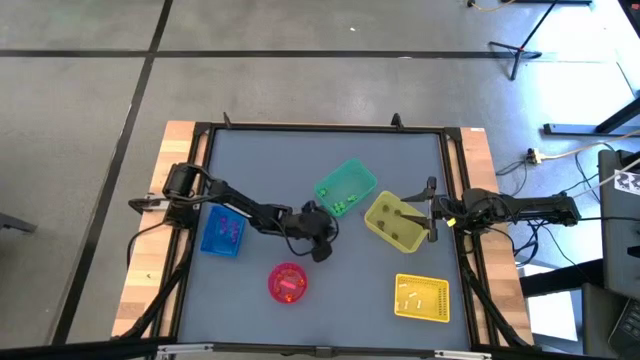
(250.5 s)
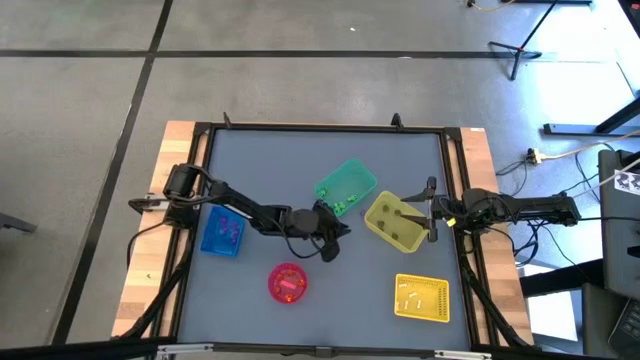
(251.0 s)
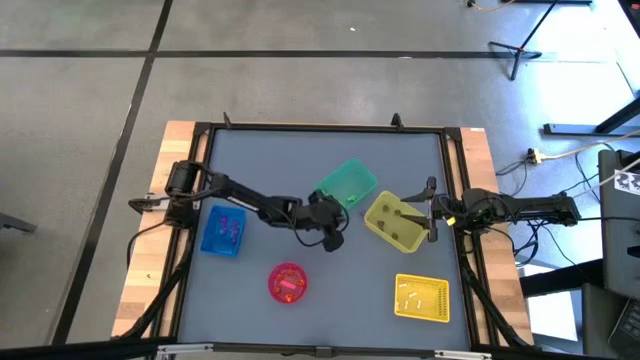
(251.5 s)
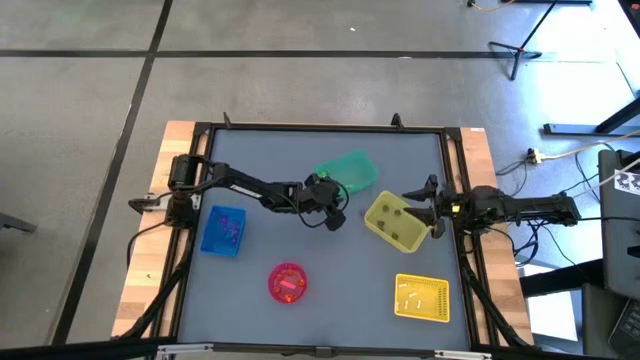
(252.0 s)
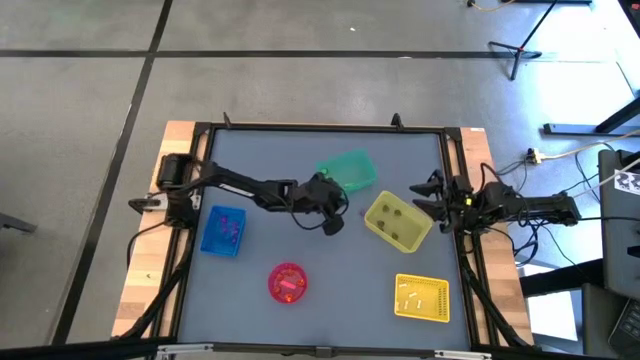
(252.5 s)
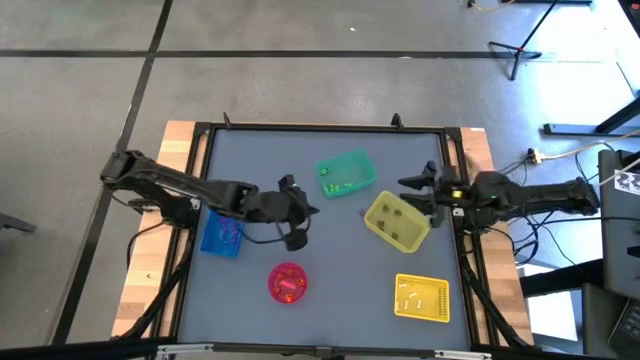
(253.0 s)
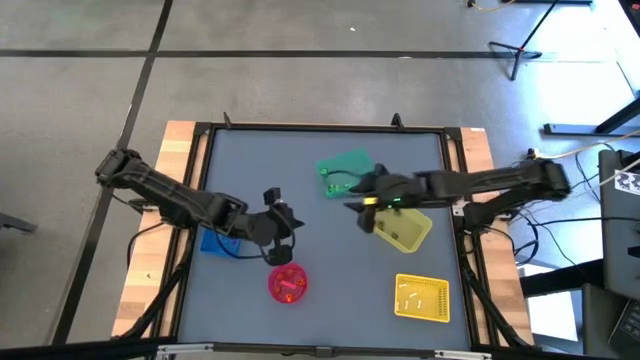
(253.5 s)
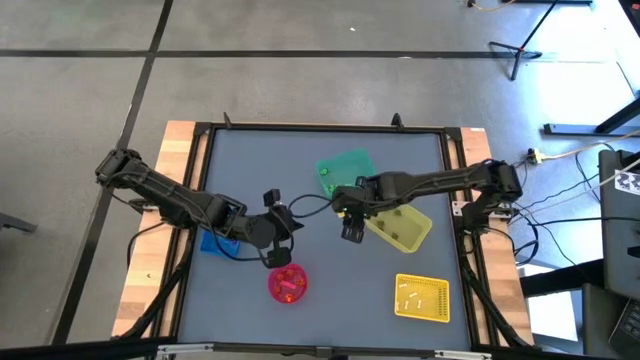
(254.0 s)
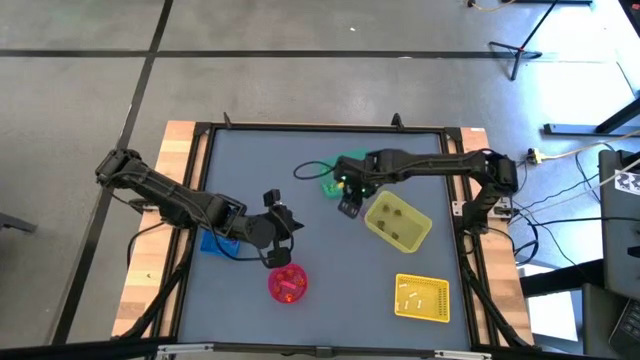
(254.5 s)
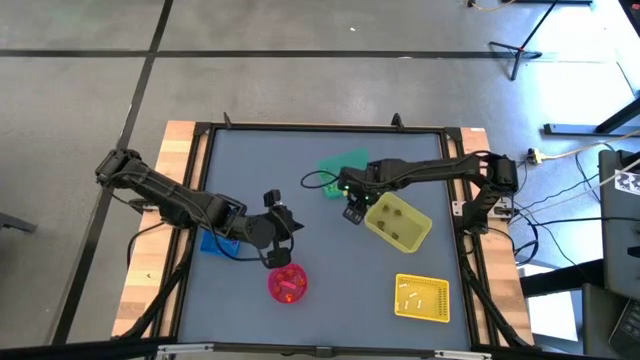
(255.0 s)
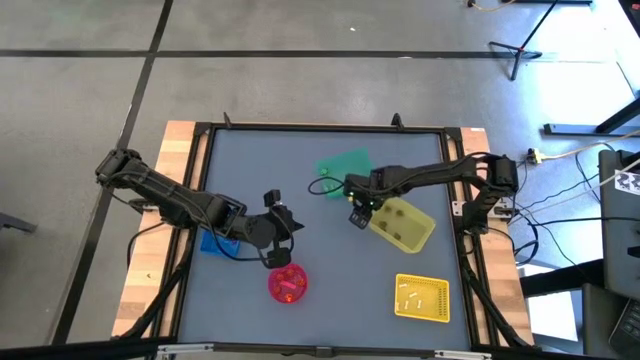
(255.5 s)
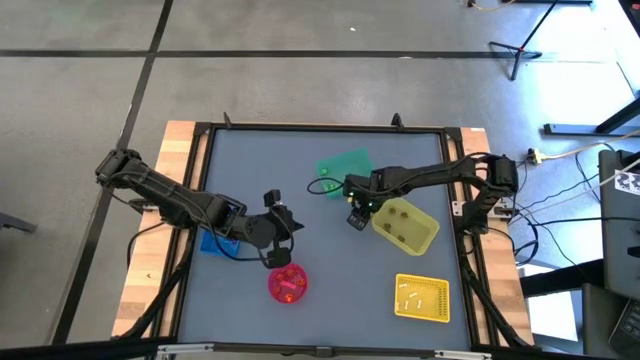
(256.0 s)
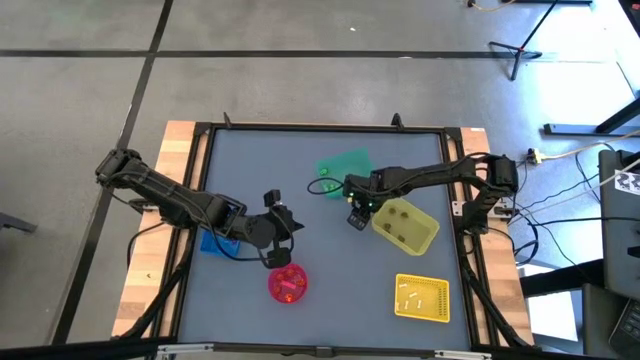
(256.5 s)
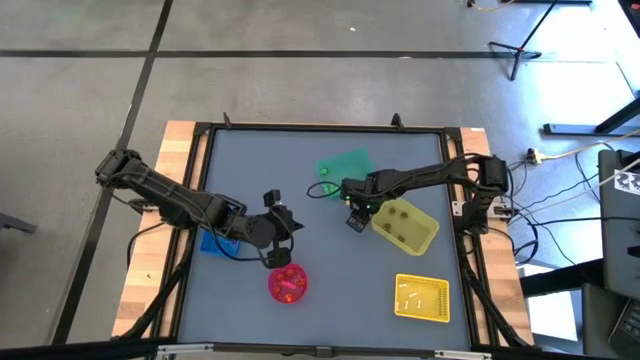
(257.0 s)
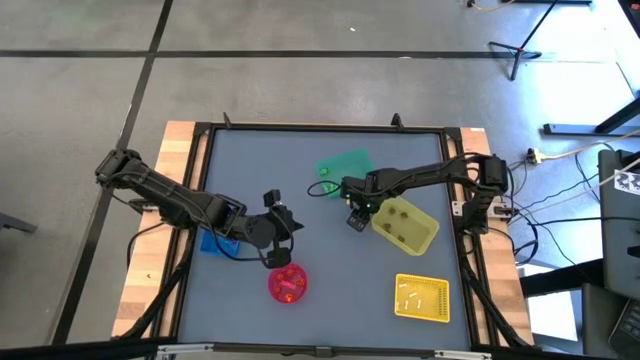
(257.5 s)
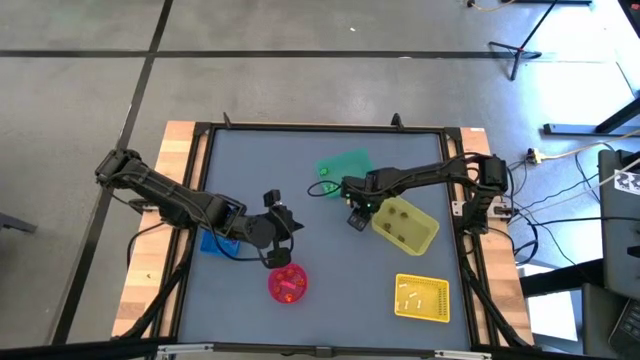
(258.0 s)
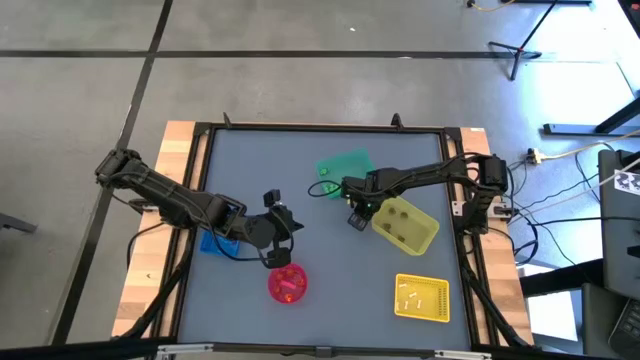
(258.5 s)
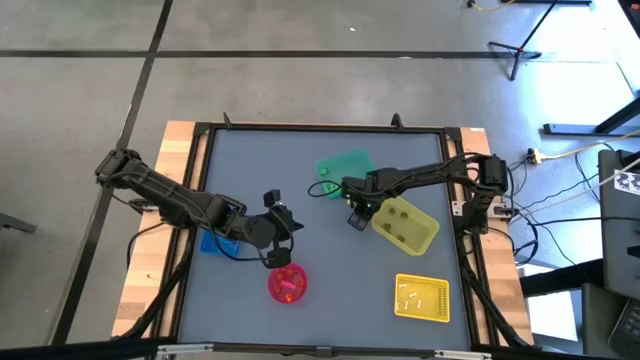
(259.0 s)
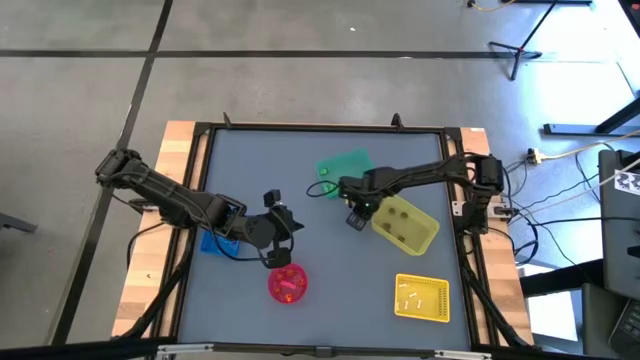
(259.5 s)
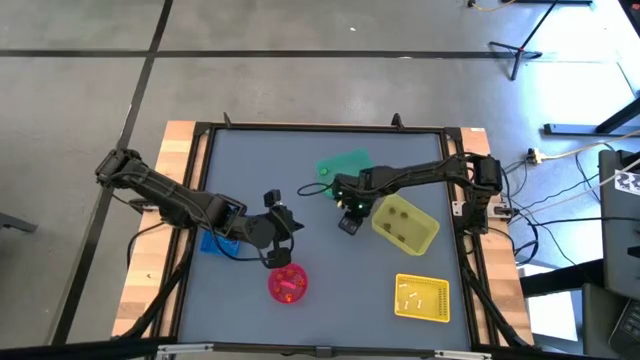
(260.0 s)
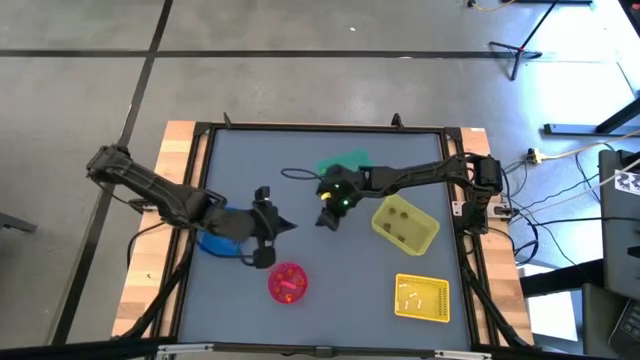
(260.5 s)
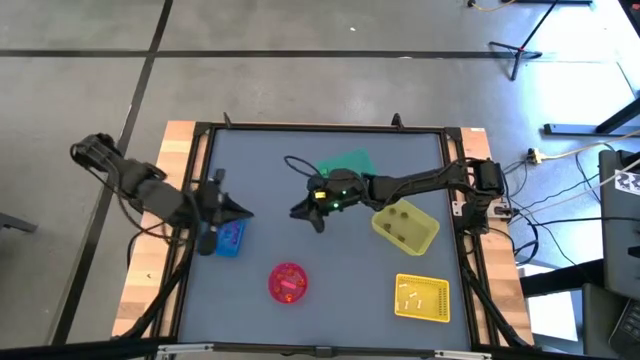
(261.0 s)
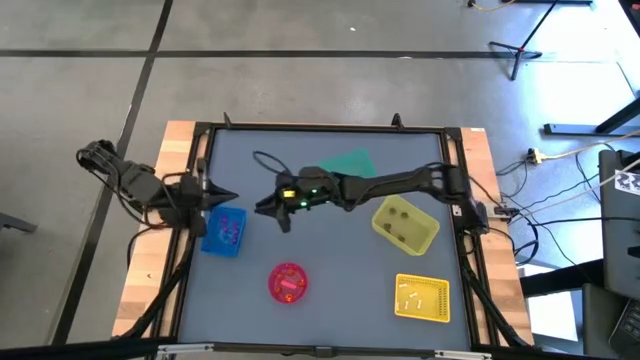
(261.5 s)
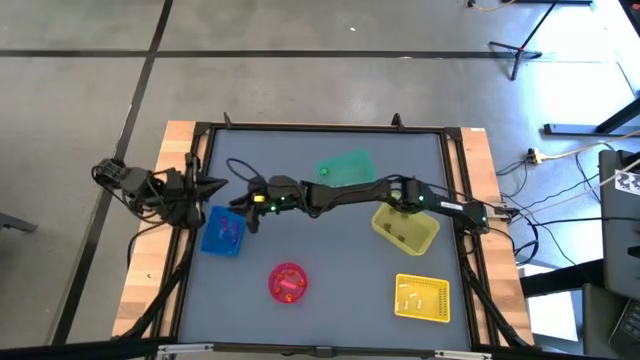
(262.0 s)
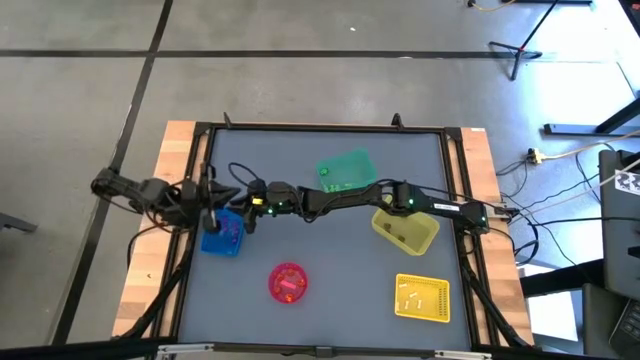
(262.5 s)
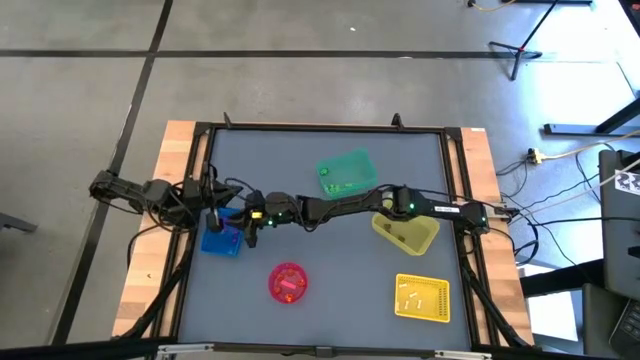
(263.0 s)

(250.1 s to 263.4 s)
Task: Sort Halloween decoration
Put the violet spider toy into the blue bin

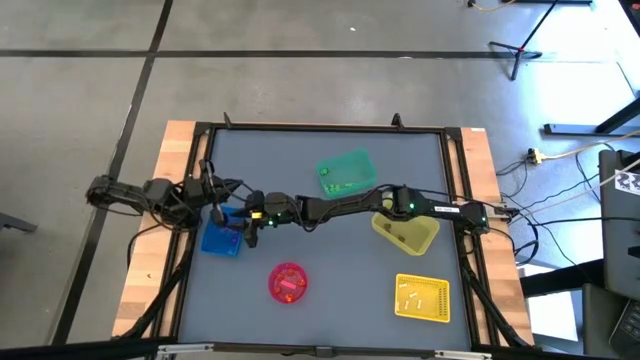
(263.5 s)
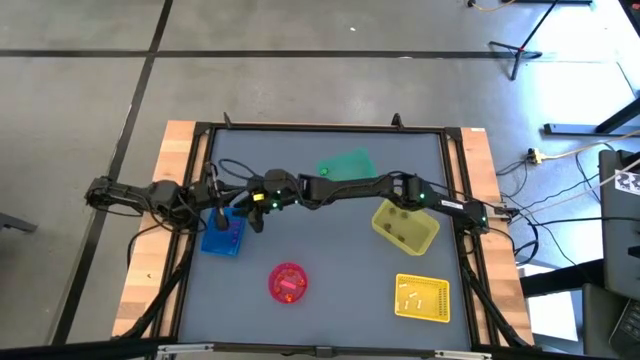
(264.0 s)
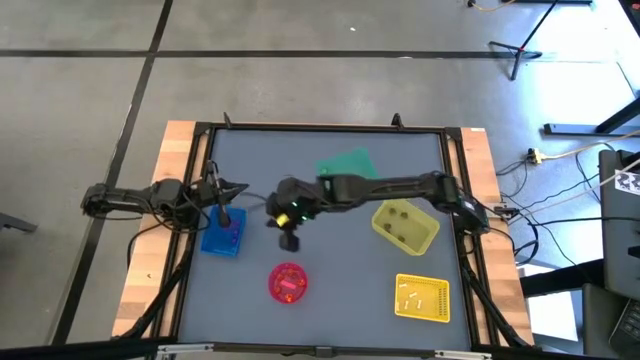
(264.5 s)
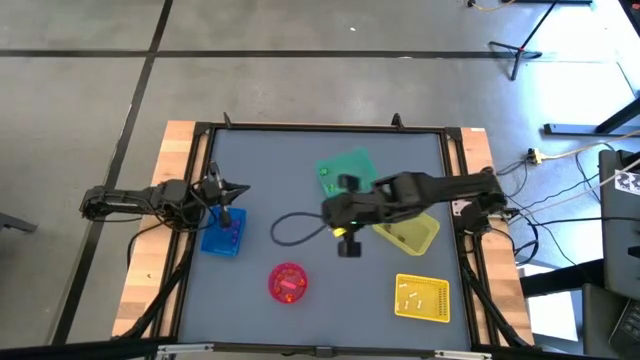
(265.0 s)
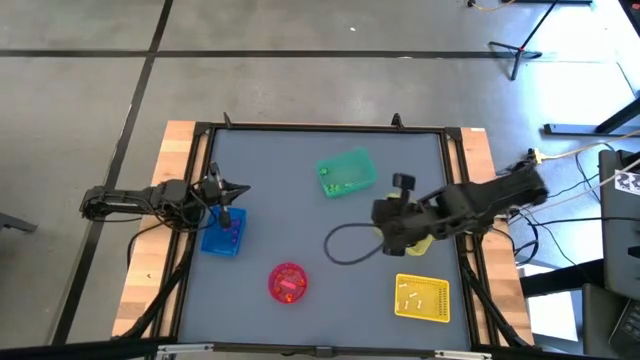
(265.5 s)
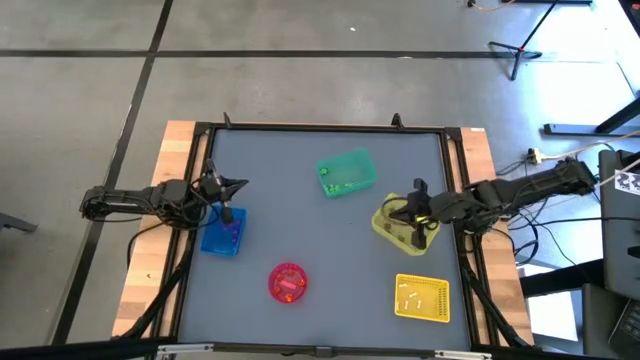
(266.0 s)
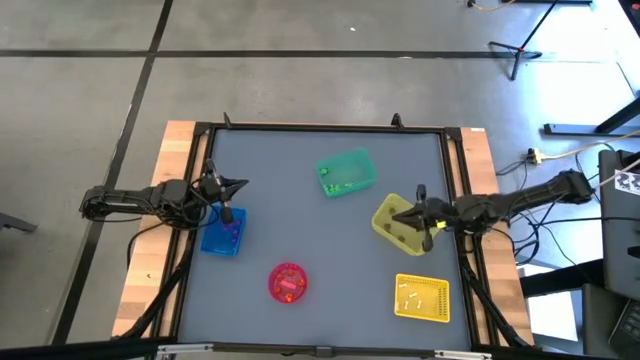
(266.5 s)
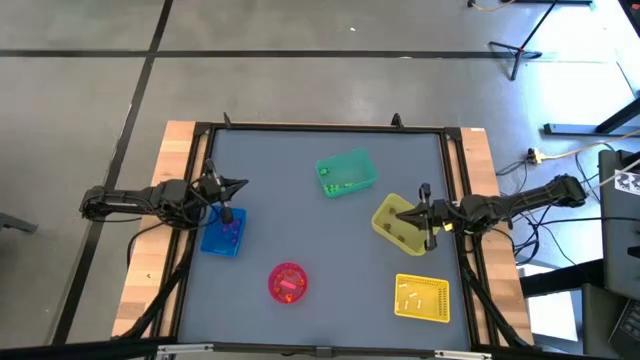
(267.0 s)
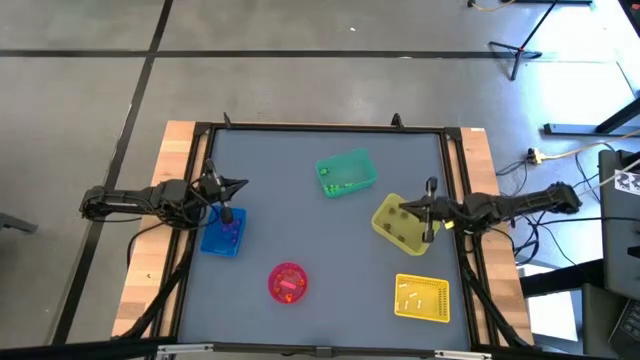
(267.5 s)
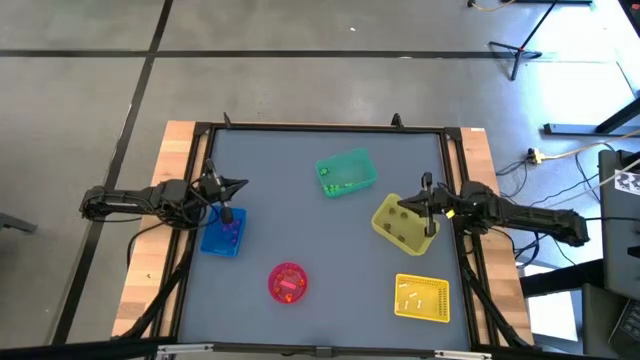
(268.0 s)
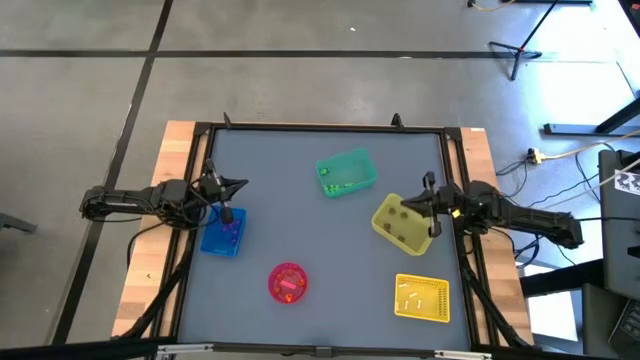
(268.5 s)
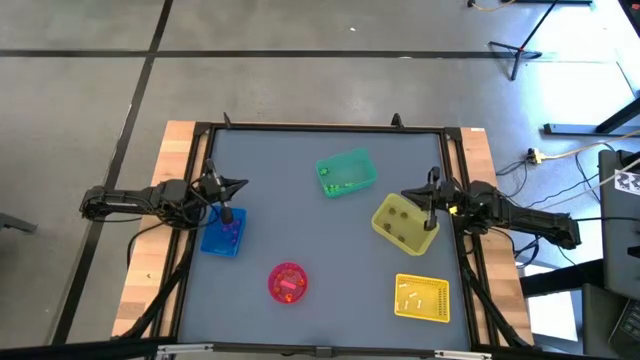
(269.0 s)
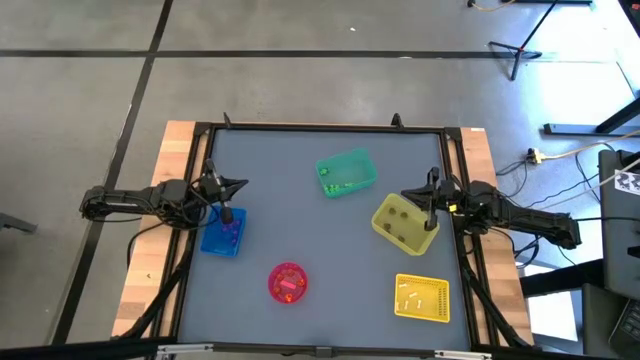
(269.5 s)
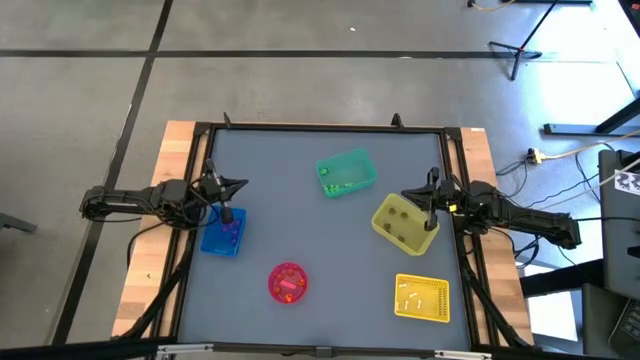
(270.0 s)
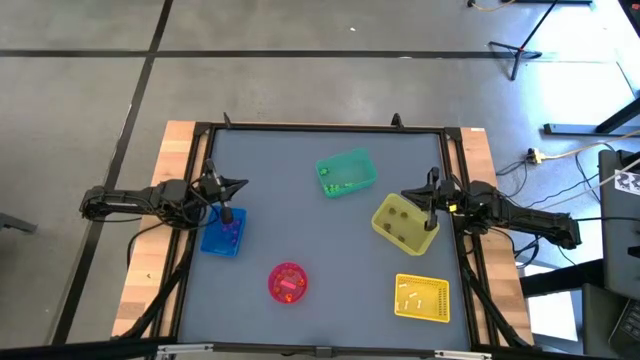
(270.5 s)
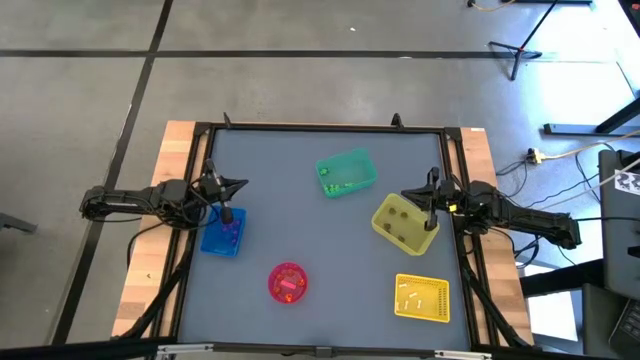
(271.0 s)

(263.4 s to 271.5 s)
Return to Home Position

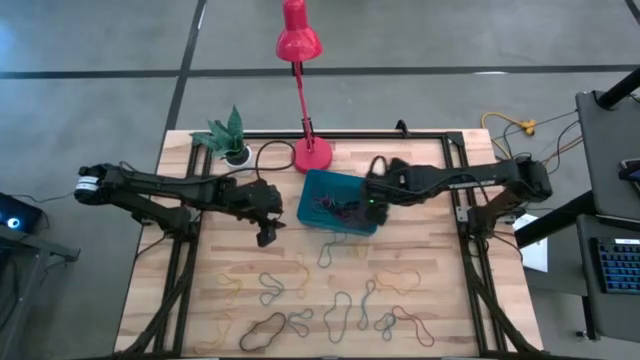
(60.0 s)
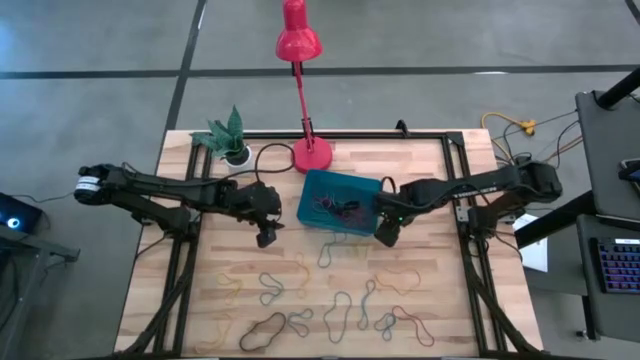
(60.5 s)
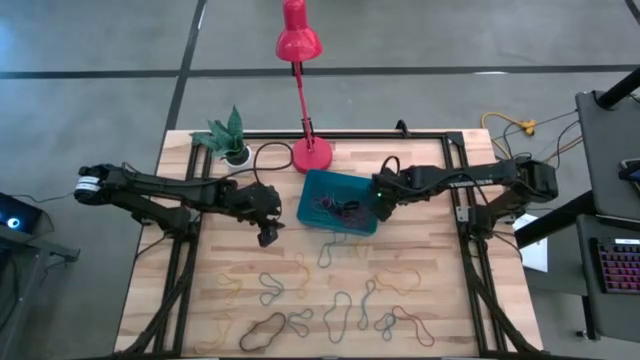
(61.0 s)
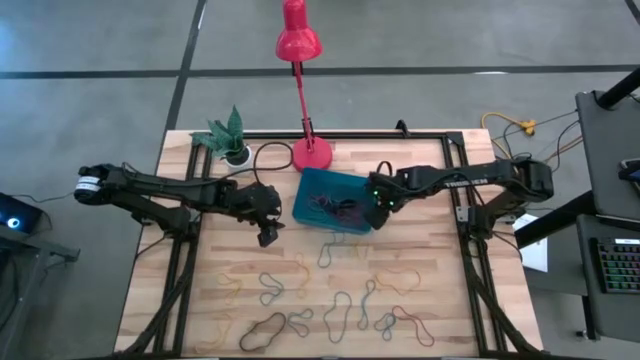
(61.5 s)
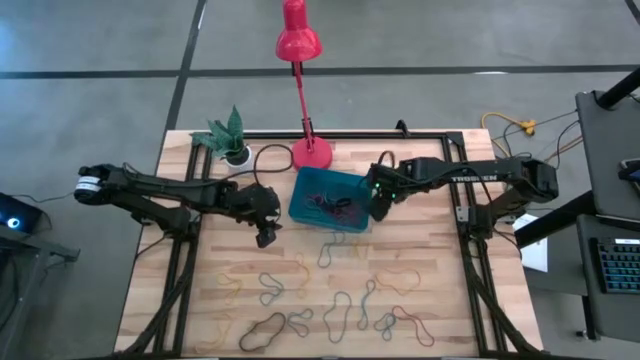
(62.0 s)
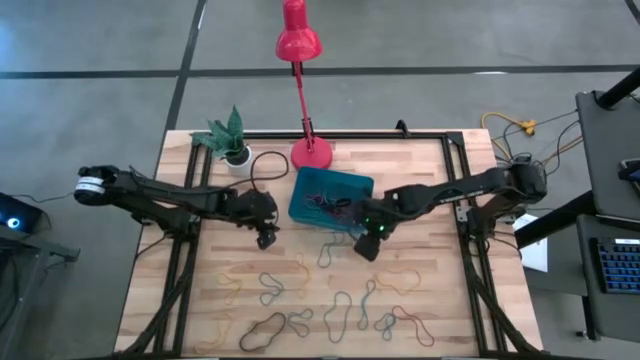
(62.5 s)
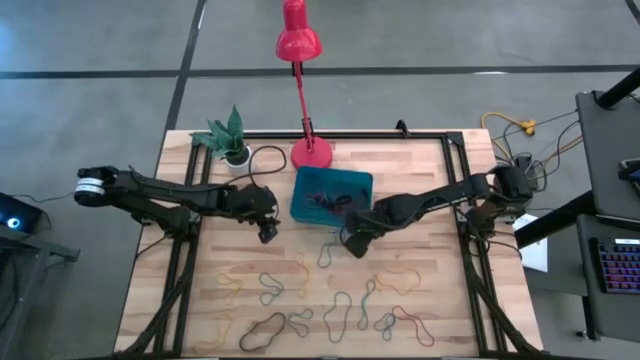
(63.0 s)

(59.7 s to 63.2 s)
Task: Pick and place rubber bands into bin
Adjust the blue bin
